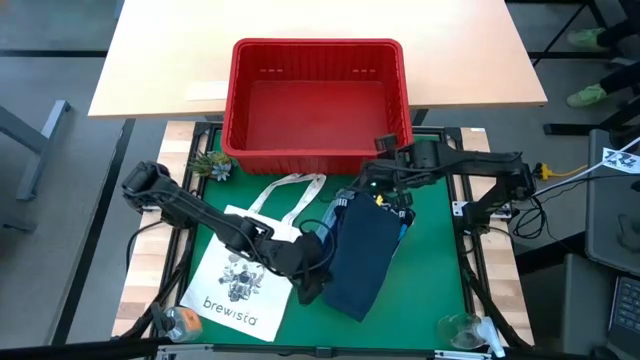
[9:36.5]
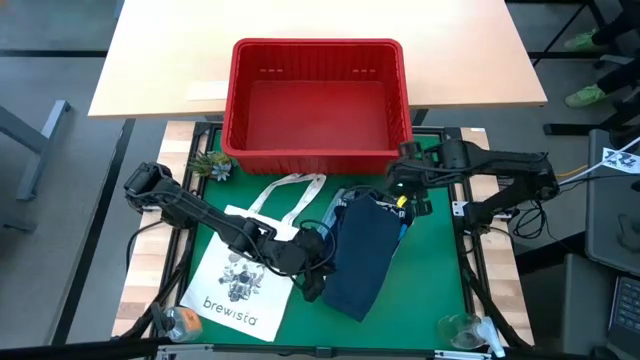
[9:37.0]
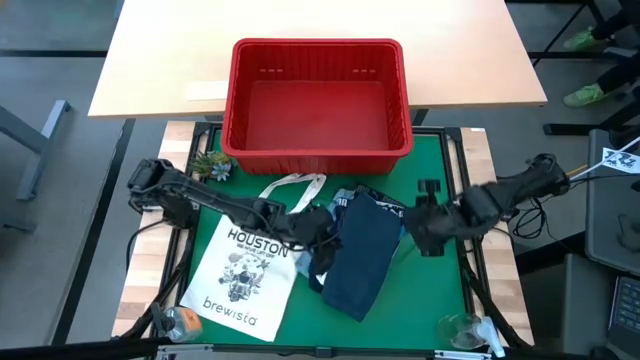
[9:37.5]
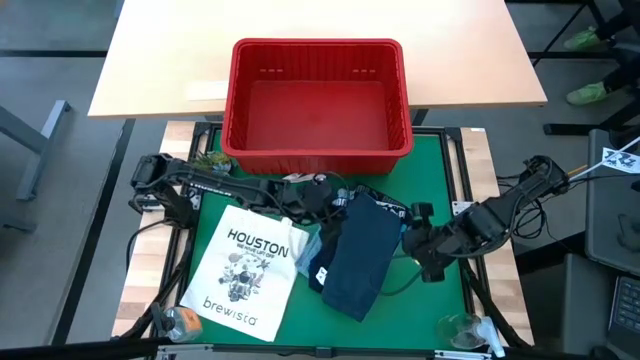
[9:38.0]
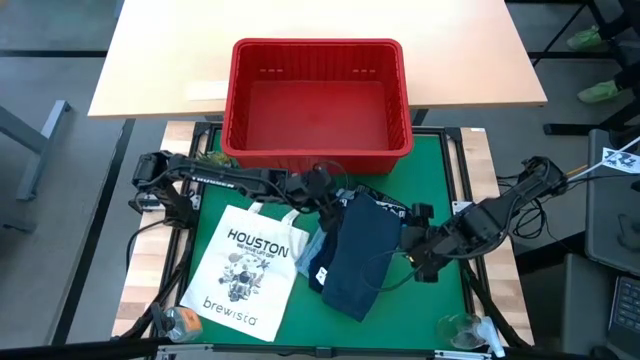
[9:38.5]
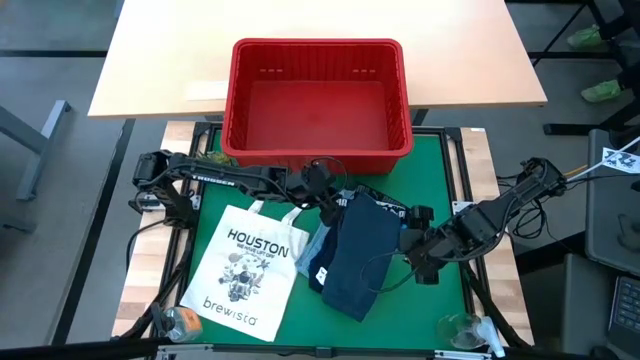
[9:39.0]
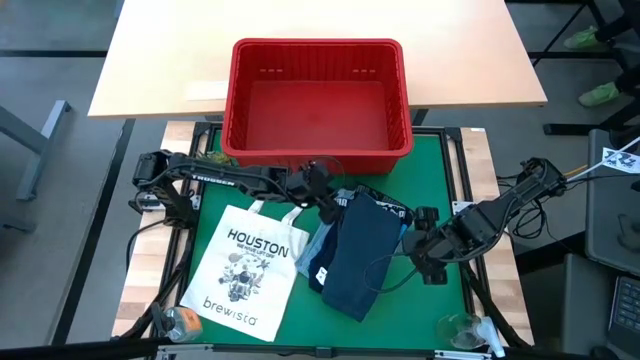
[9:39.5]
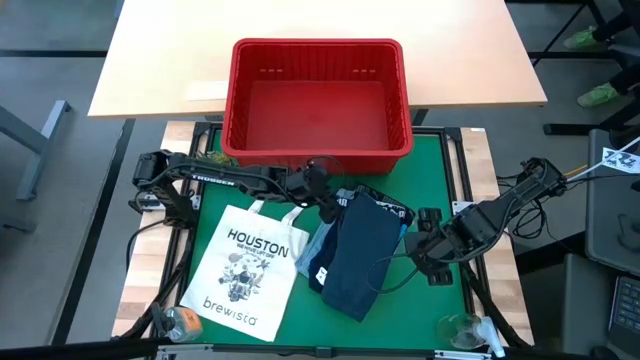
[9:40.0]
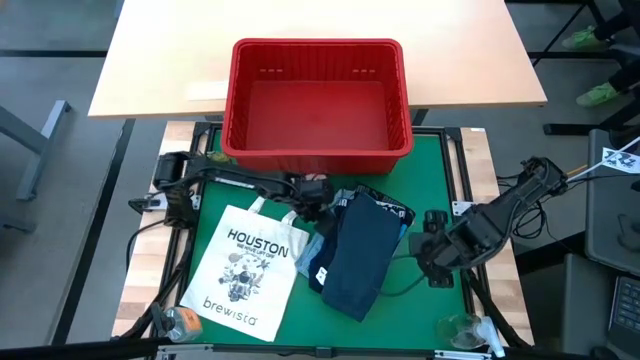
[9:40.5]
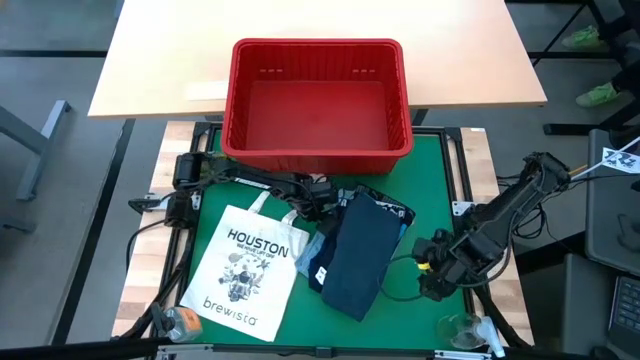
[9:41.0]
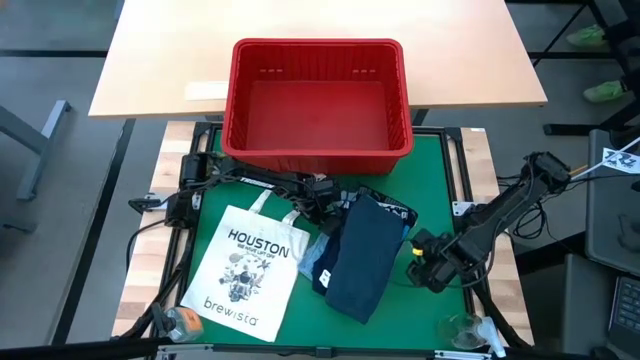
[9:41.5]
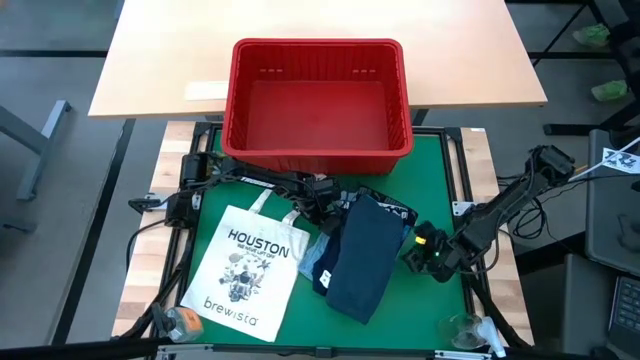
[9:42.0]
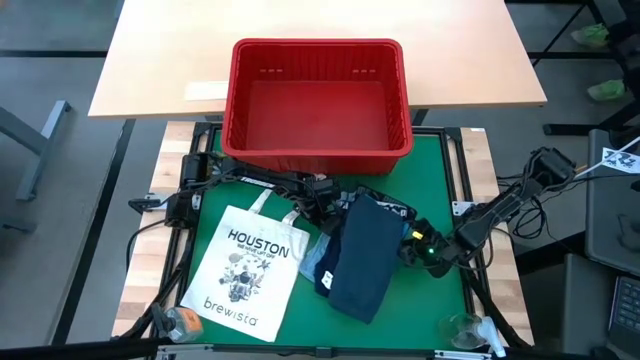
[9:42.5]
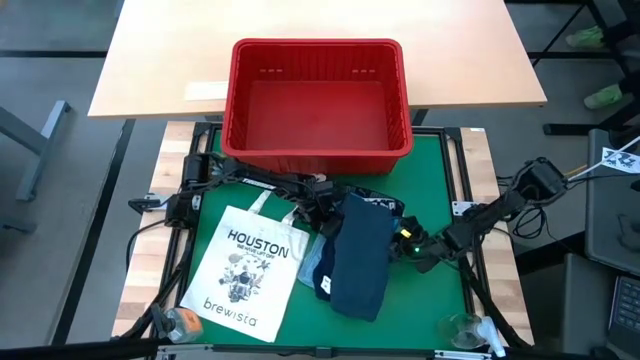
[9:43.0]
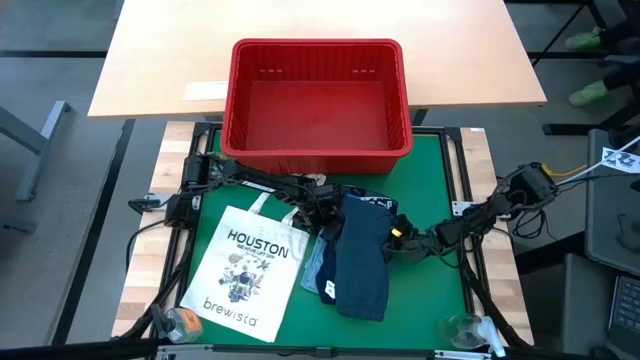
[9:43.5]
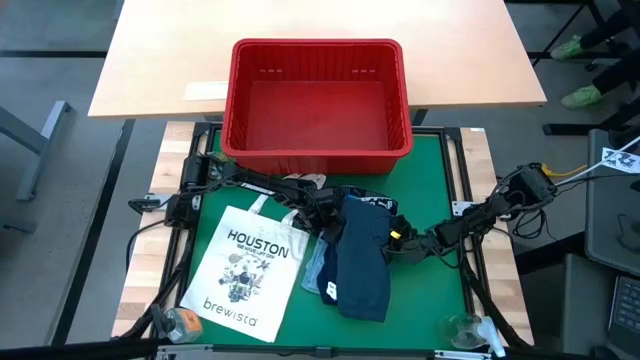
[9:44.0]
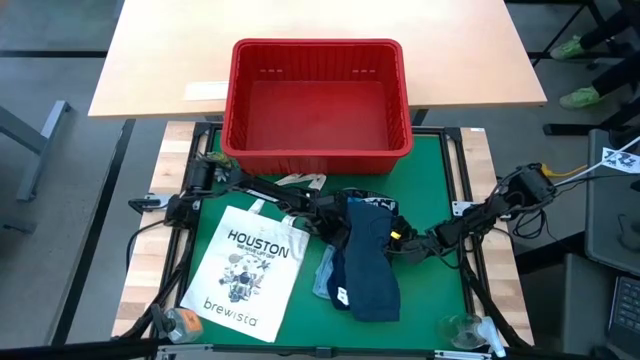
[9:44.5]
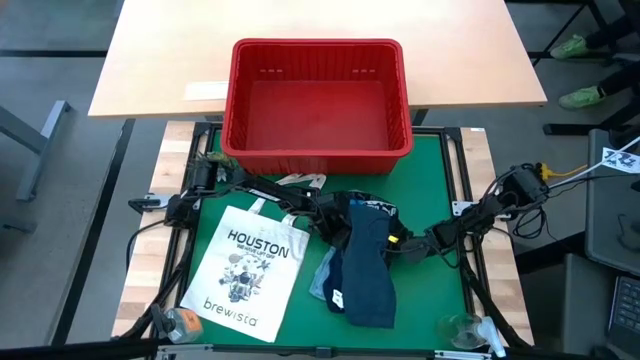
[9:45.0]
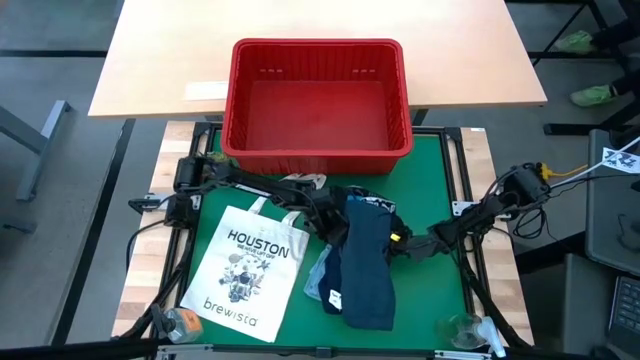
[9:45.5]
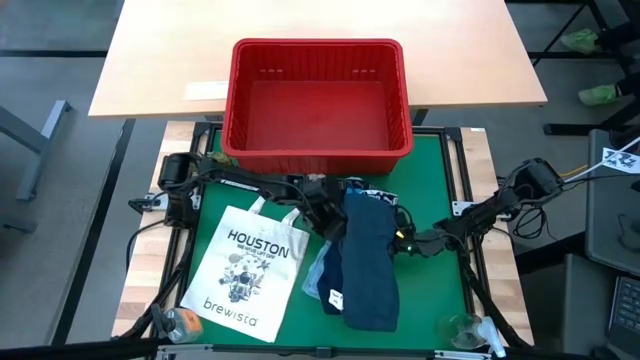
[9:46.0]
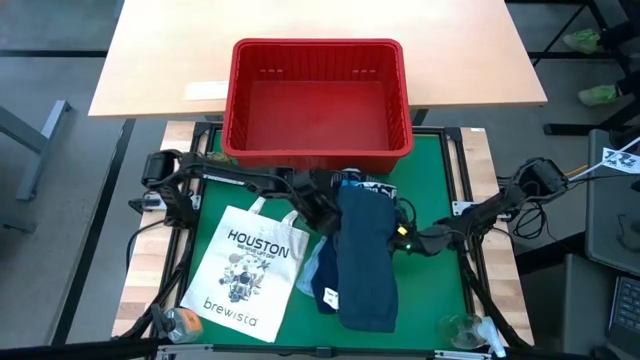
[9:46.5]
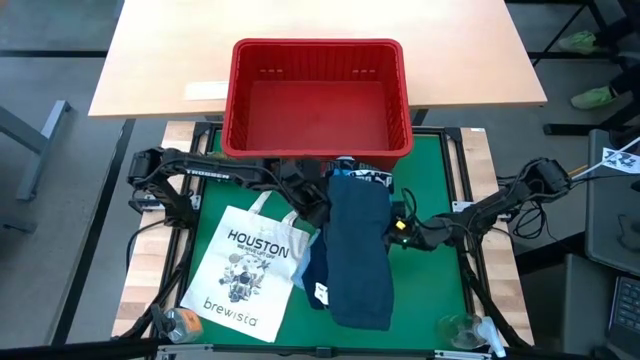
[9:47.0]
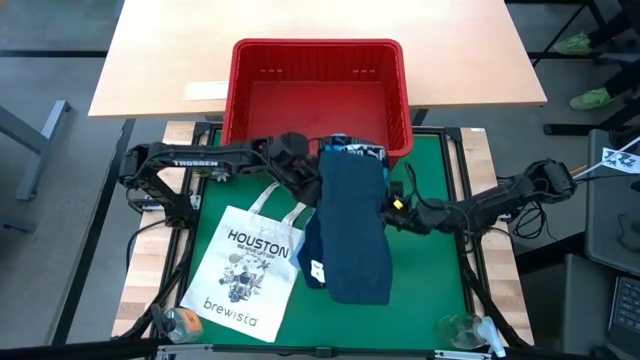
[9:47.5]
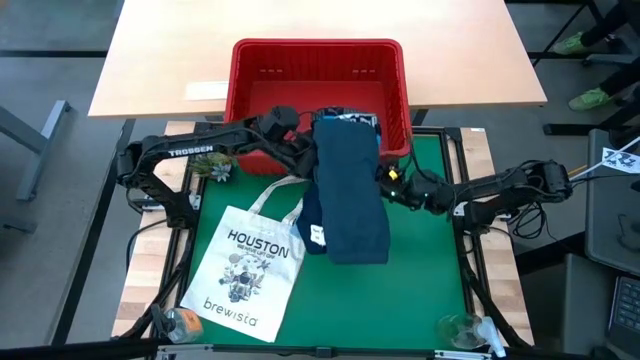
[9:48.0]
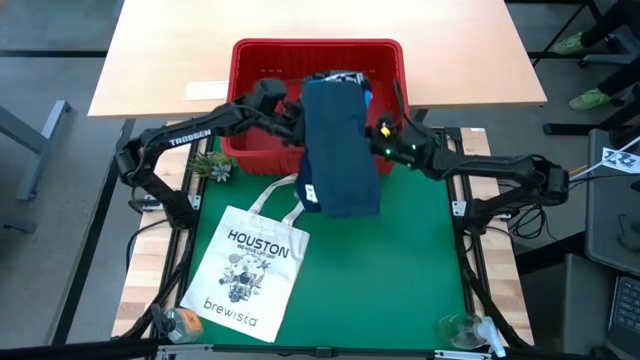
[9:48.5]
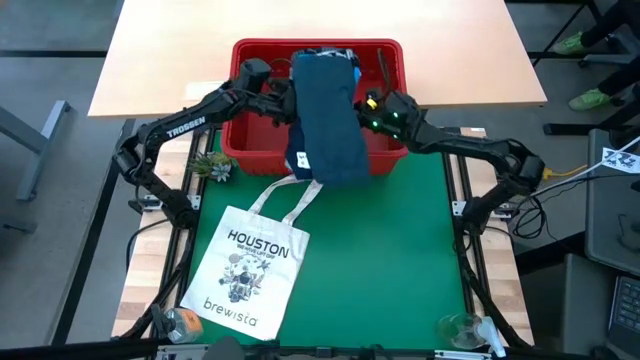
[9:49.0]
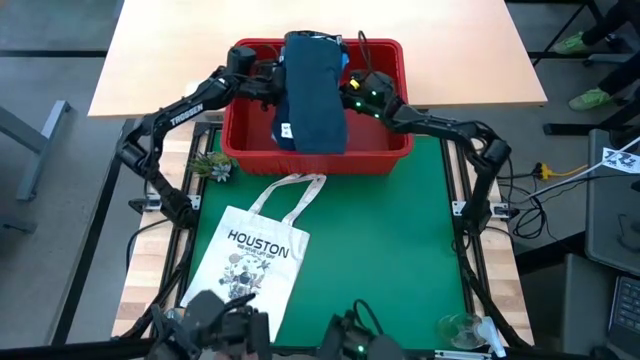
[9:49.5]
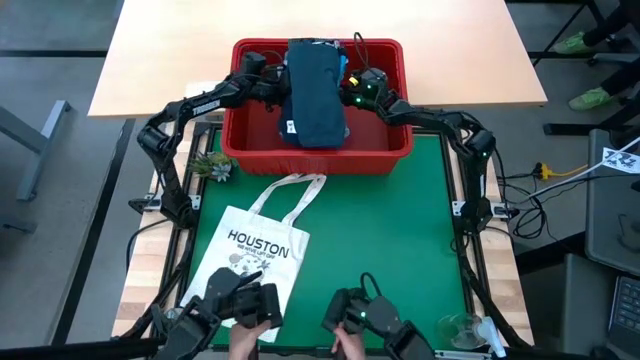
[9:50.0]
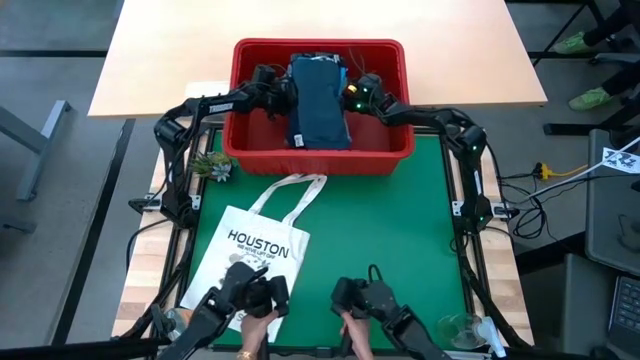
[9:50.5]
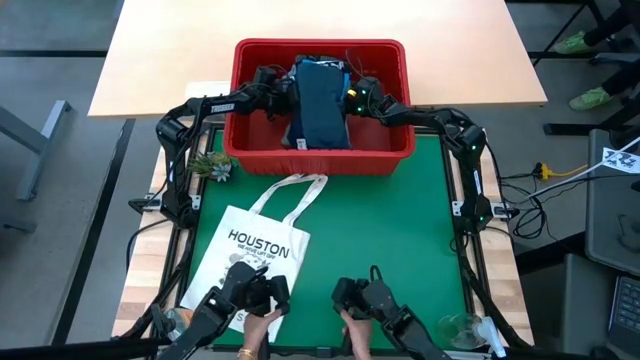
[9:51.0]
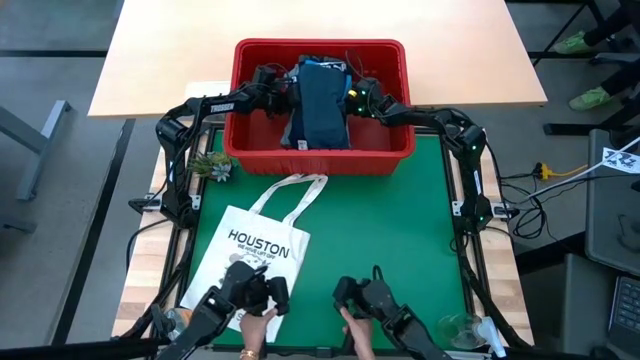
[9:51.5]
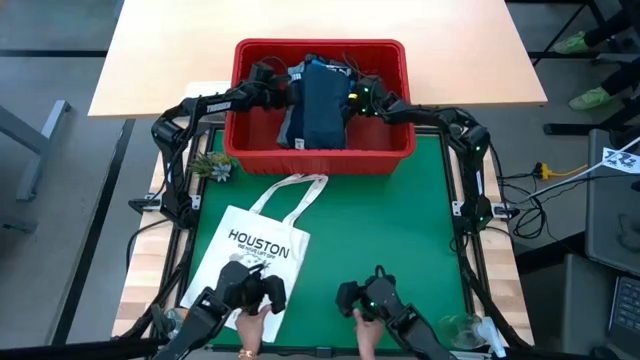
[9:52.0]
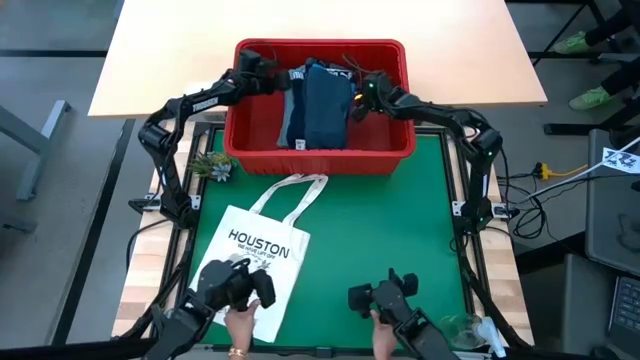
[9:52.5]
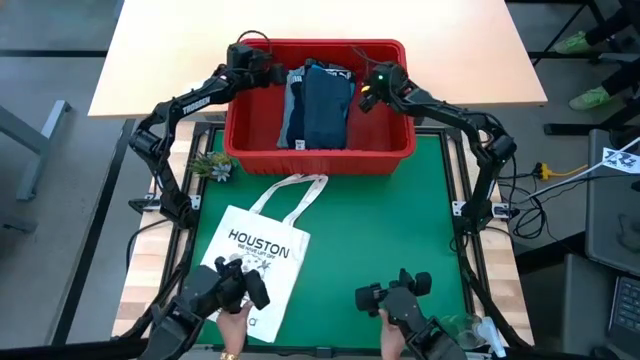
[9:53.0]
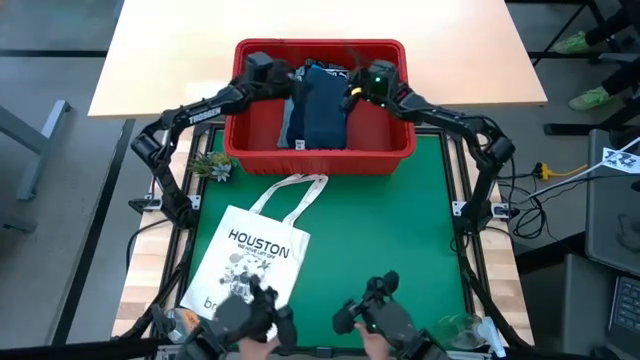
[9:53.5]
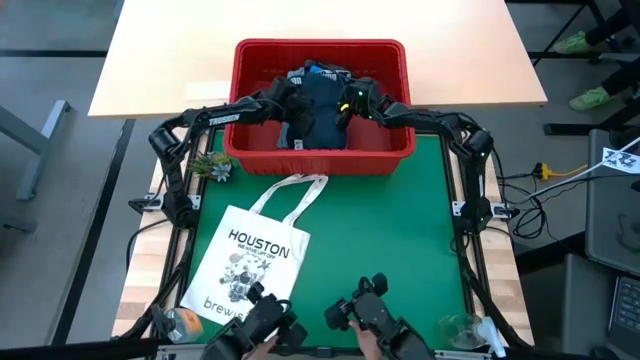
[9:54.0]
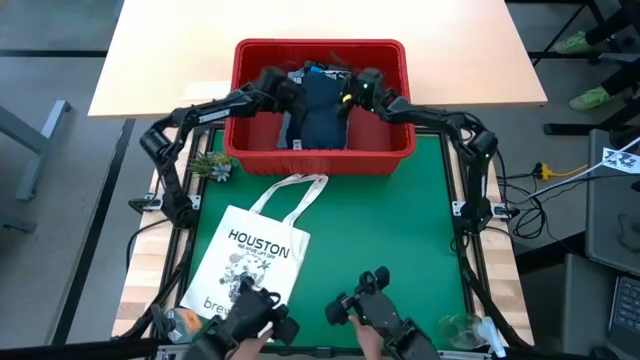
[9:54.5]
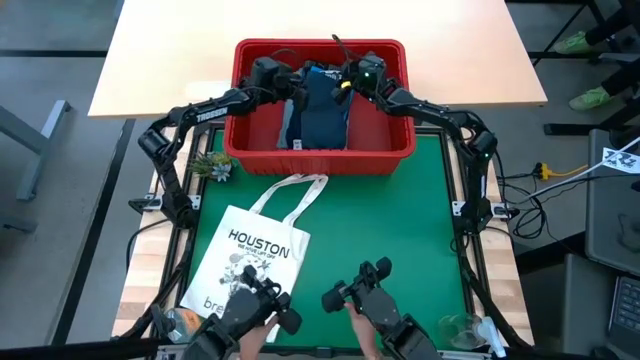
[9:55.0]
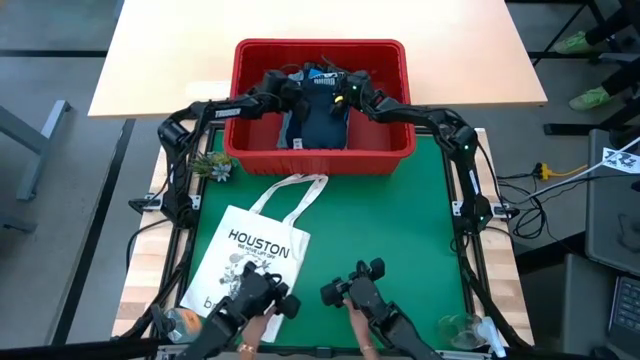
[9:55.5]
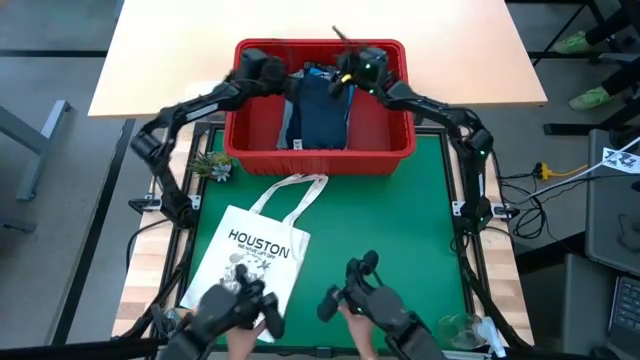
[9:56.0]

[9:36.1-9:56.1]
Task: Fold Laundry from Bin
Put the stacked clothes into the bin
